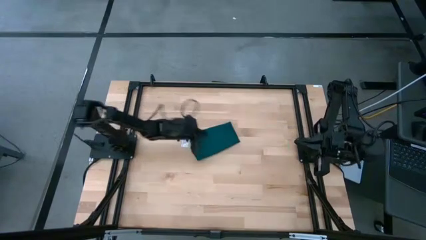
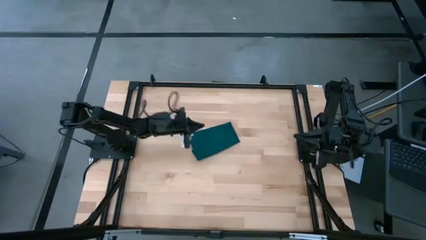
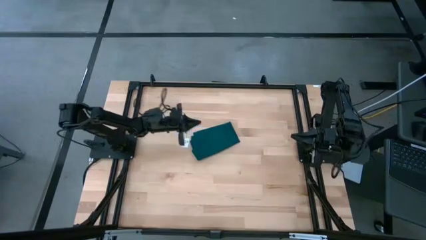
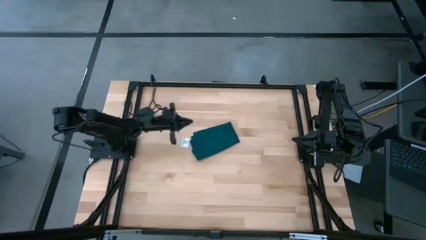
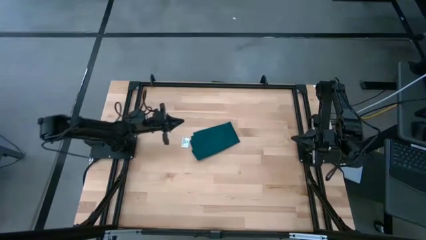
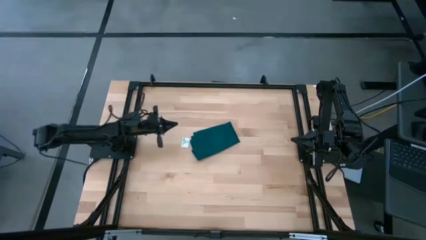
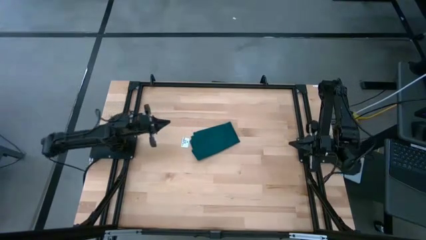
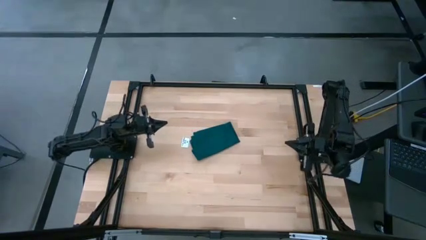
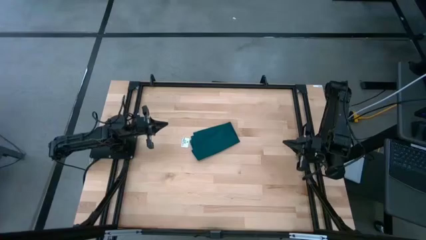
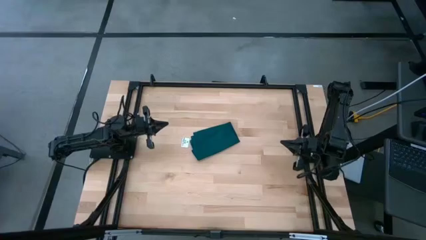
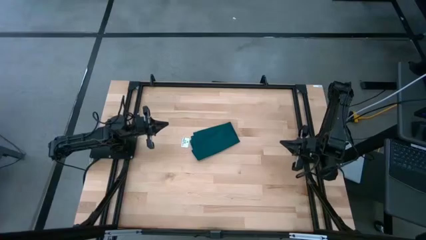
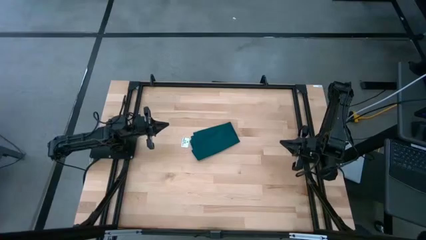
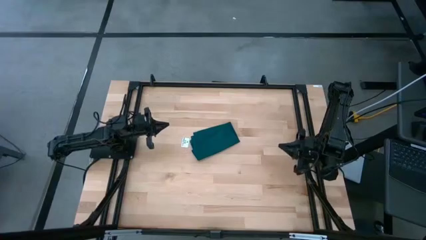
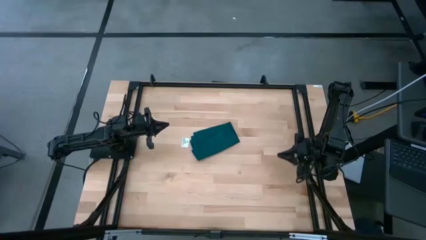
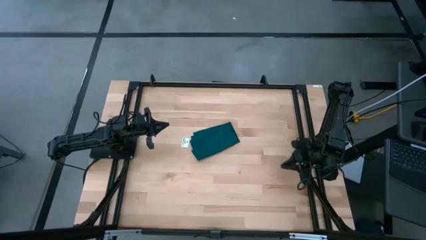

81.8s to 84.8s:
Task: Fold microfiber towels
Return to Home Position

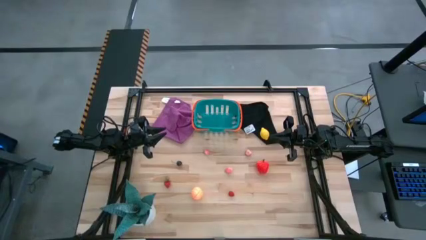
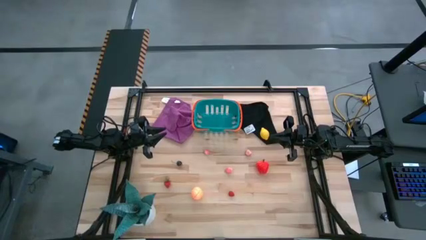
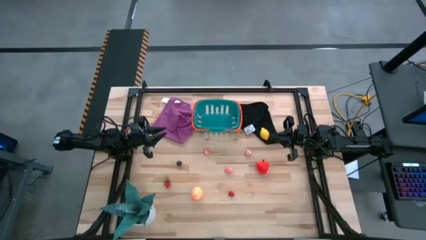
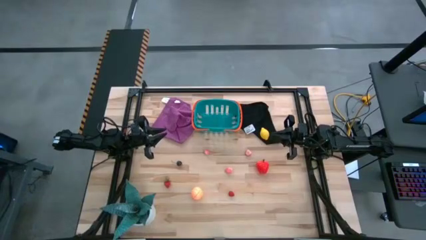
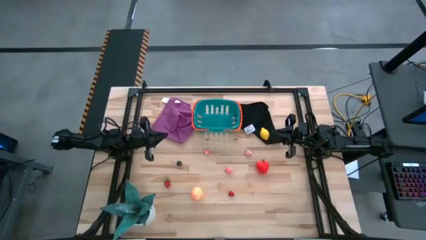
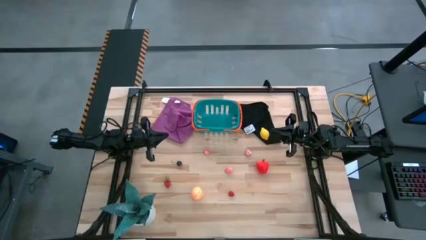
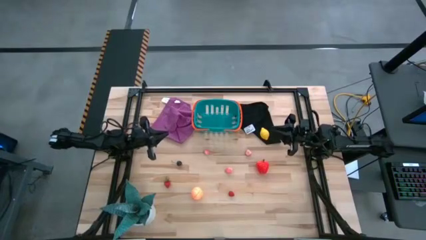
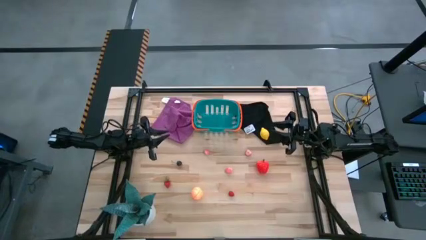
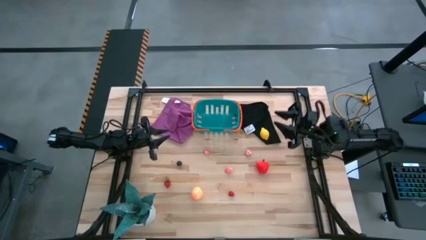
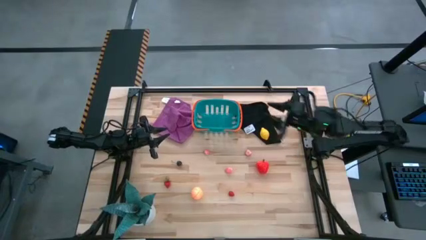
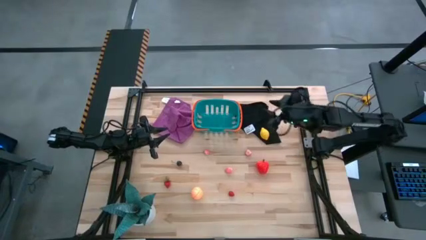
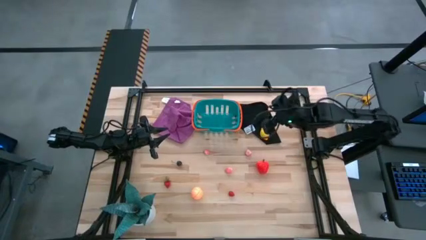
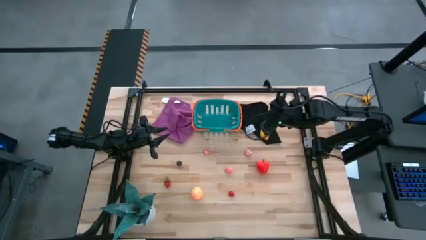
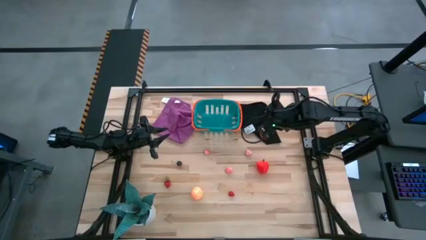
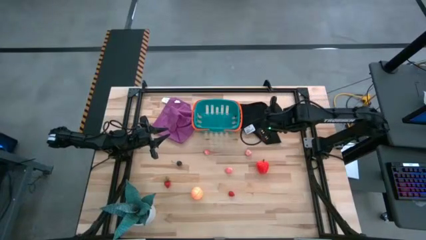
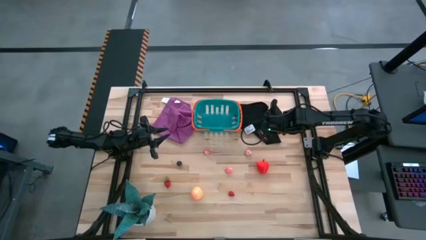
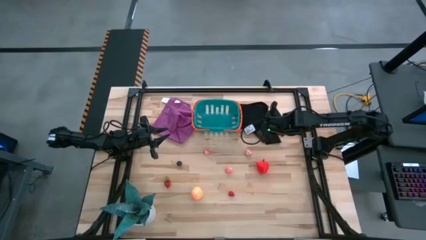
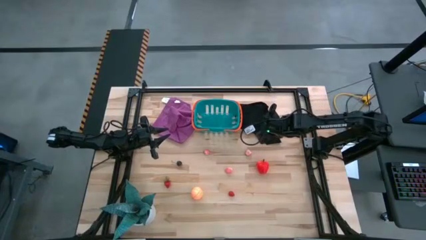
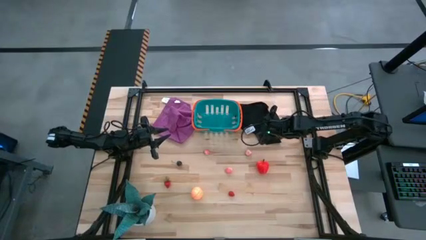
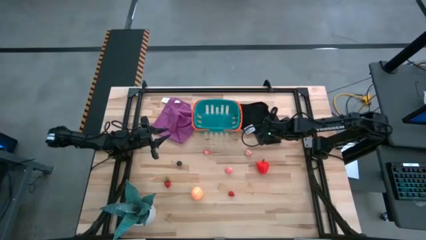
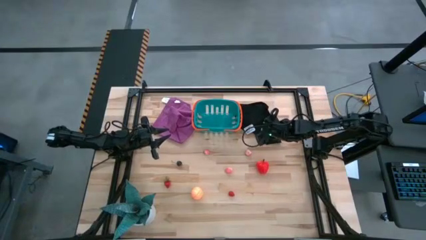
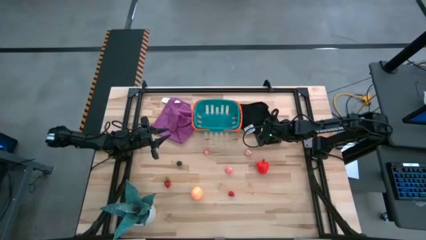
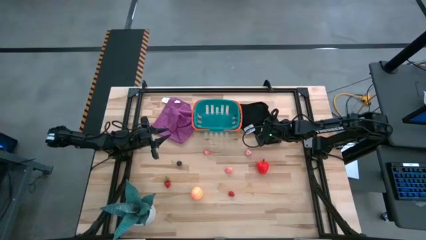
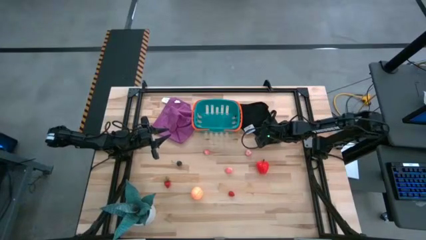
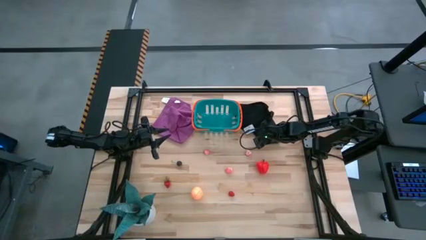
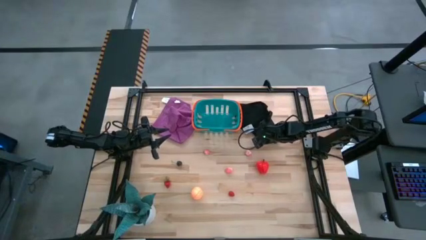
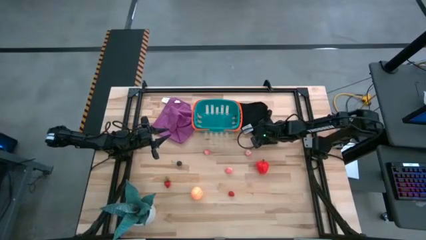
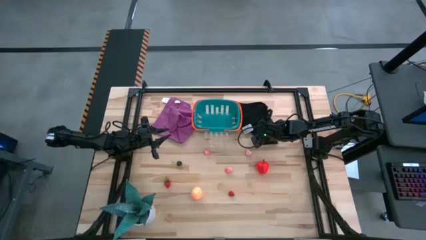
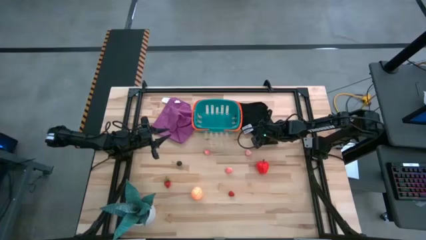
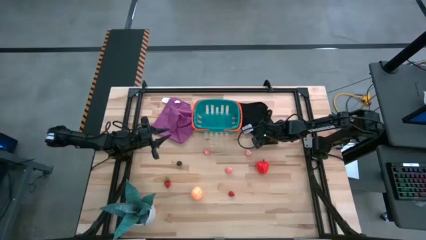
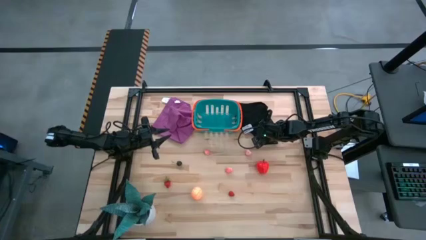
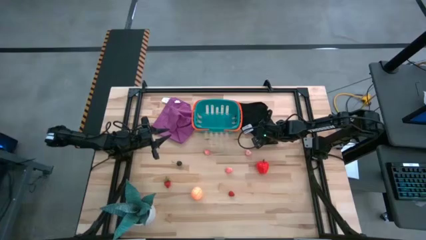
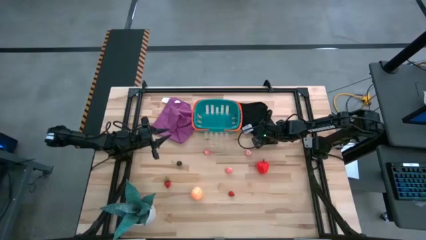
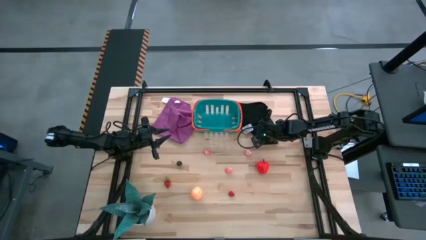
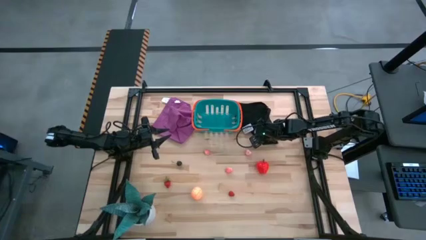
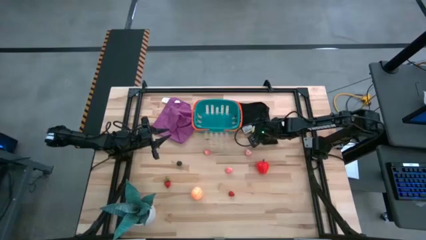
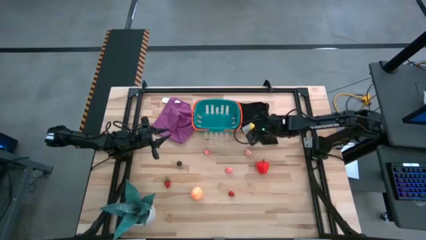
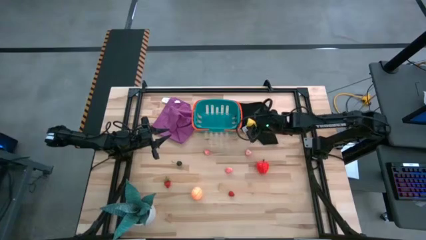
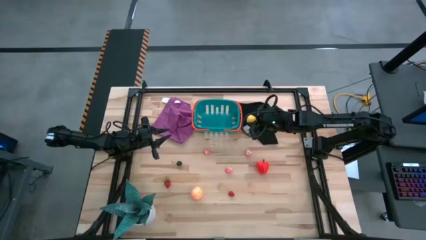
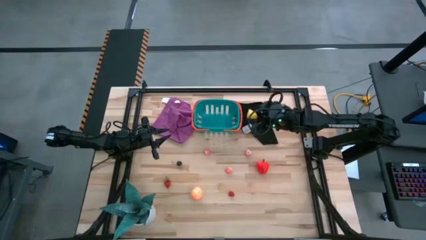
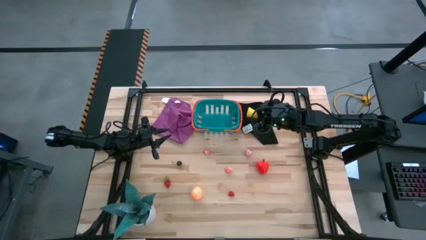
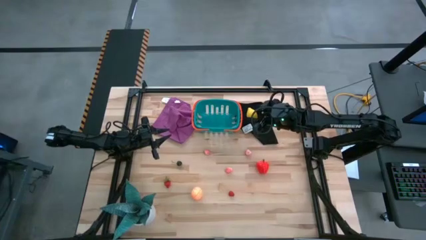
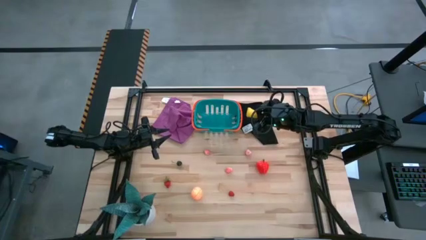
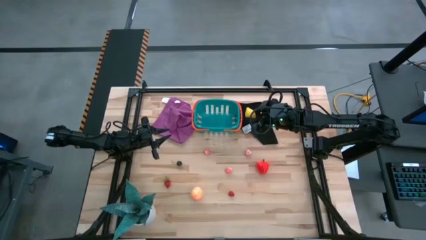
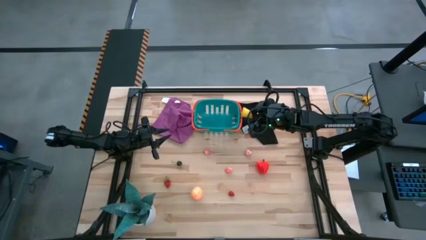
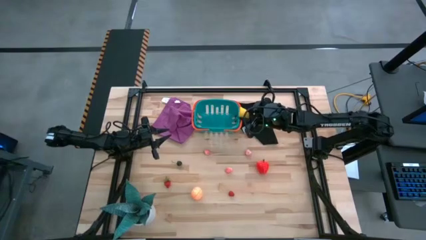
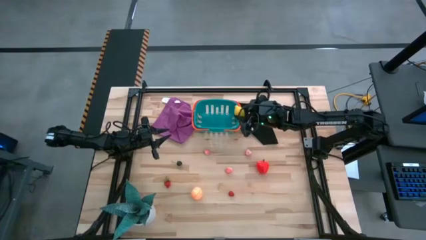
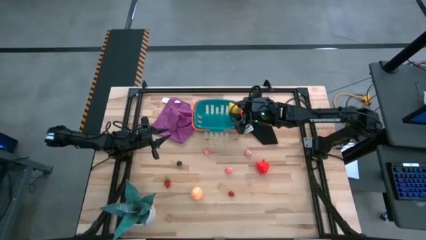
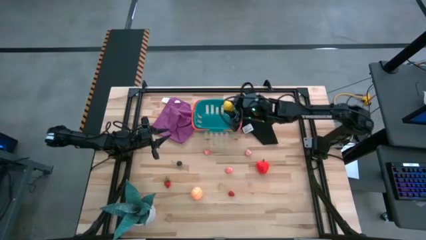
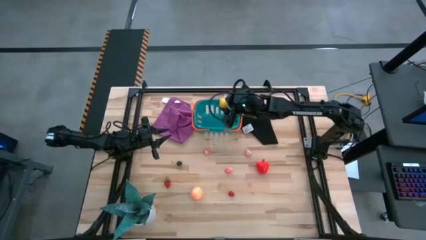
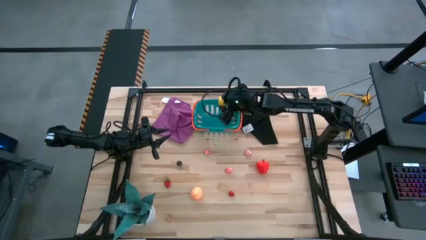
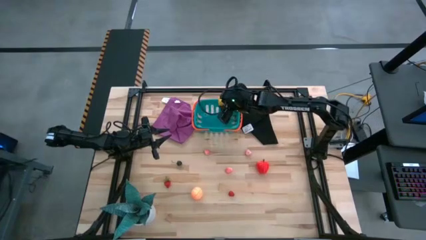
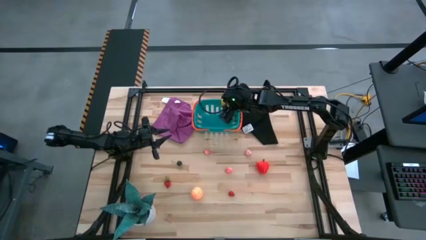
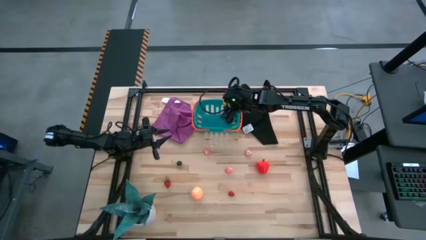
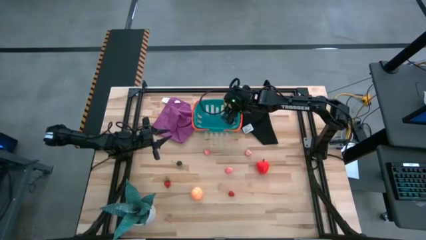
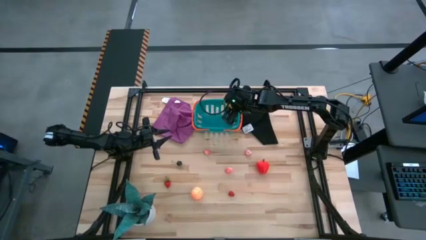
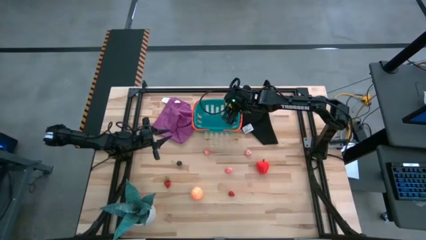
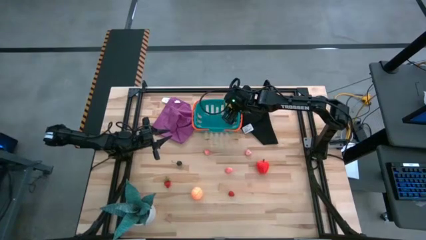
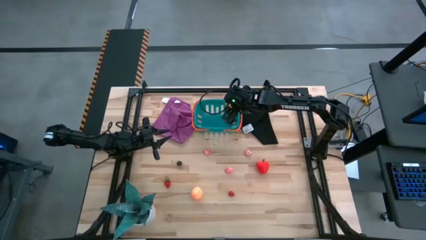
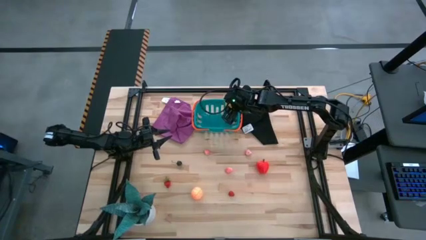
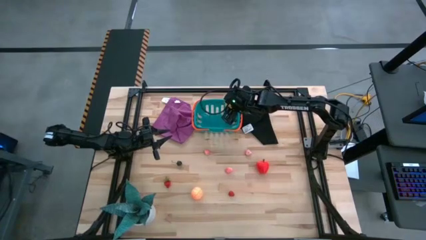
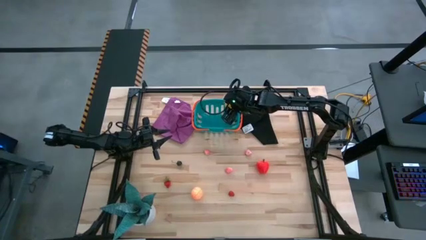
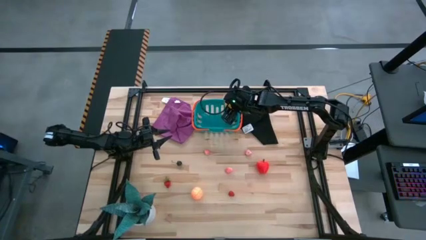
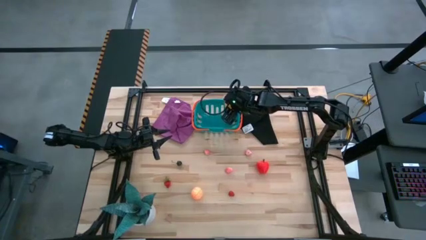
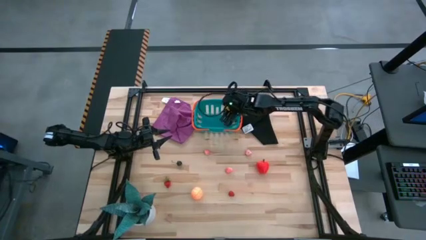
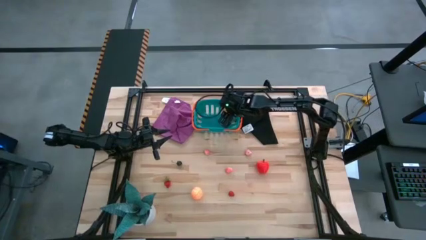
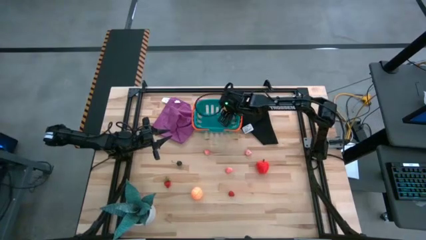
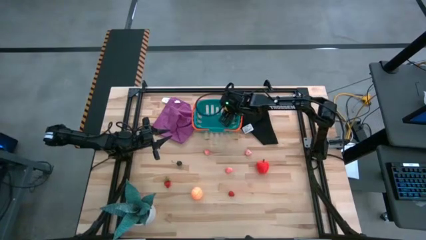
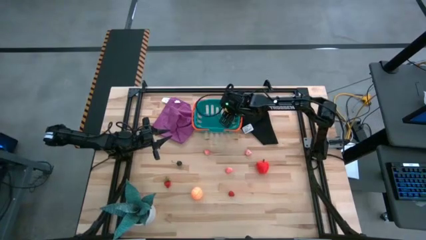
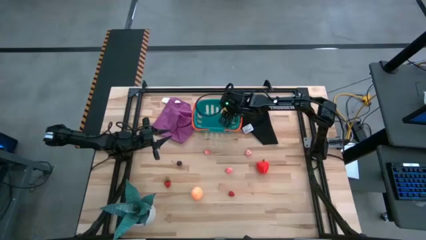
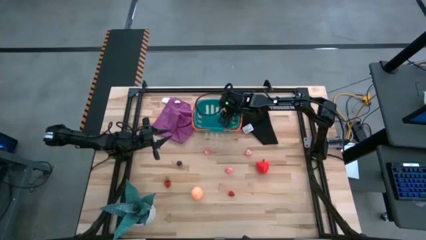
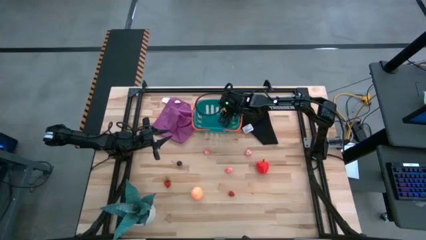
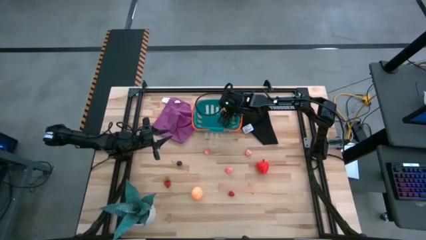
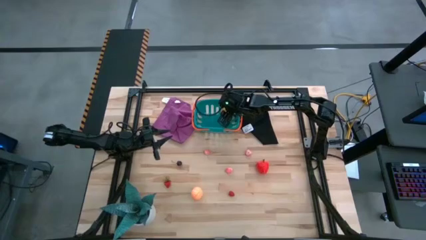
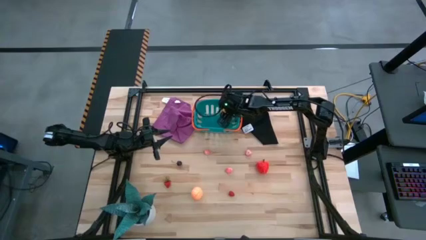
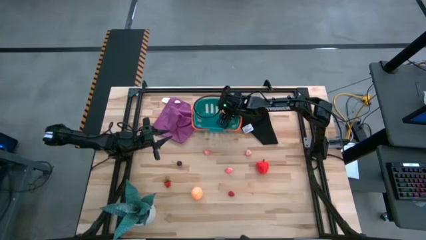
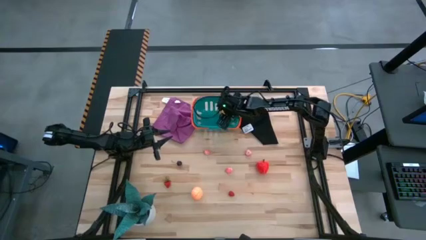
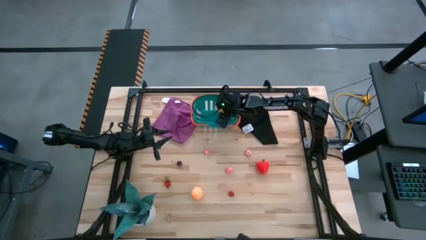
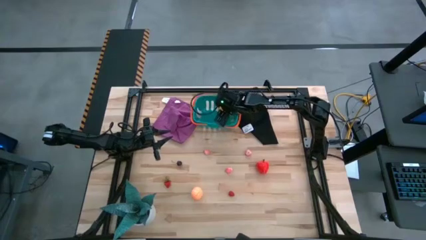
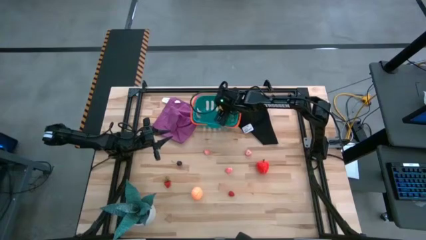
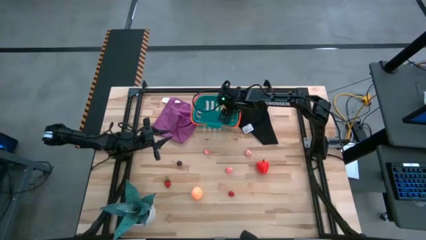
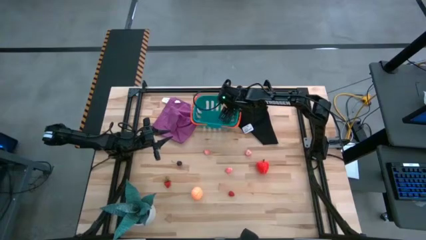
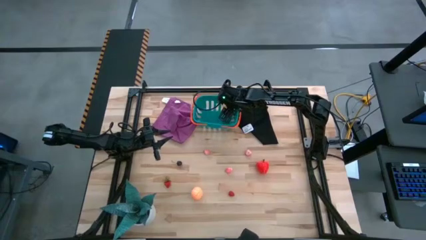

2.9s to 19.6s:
Task: Pick and placing Produce into tupperware
Put the yellow lemon into the blue bin
